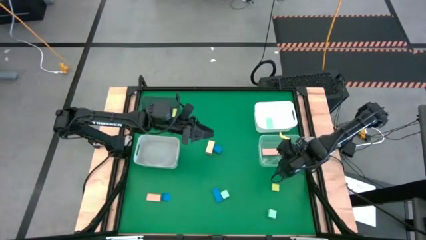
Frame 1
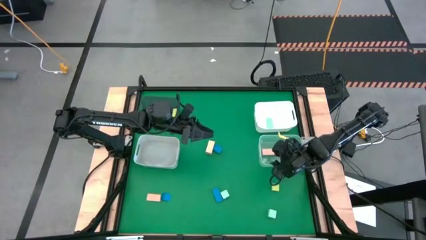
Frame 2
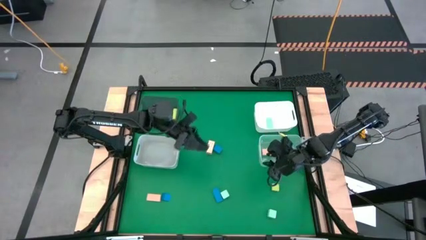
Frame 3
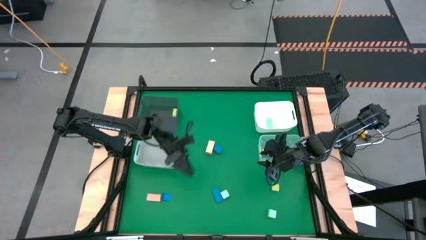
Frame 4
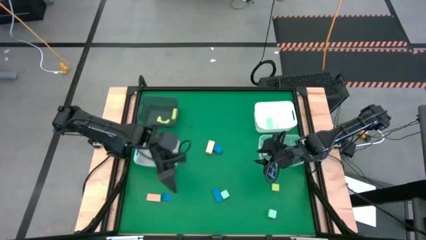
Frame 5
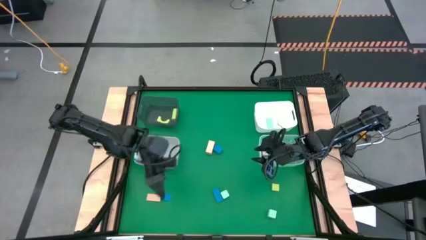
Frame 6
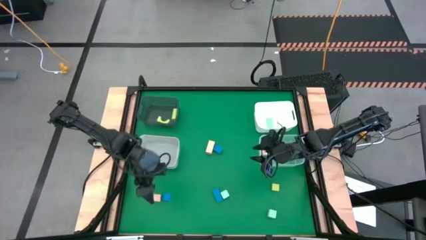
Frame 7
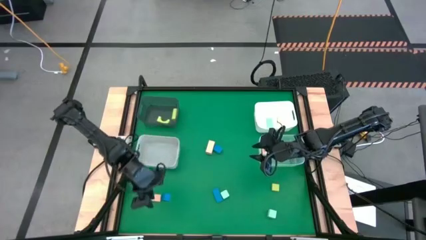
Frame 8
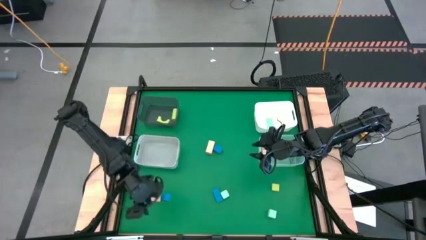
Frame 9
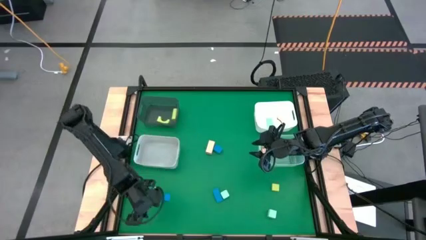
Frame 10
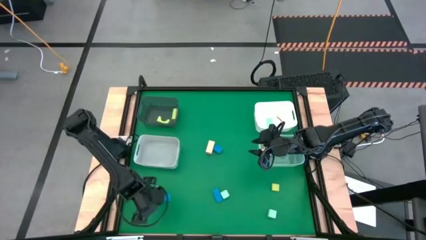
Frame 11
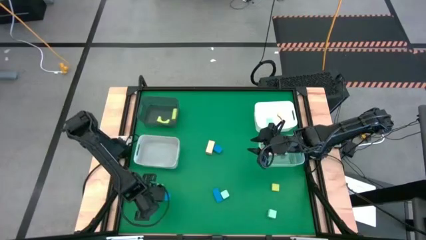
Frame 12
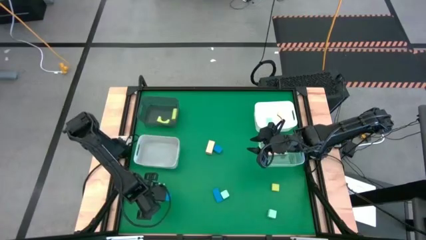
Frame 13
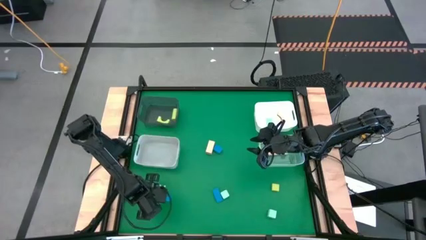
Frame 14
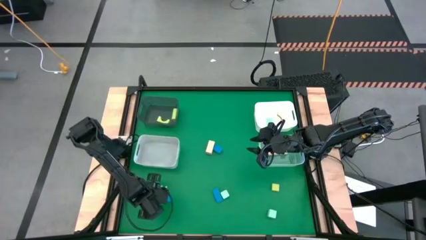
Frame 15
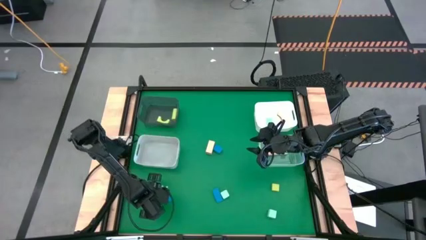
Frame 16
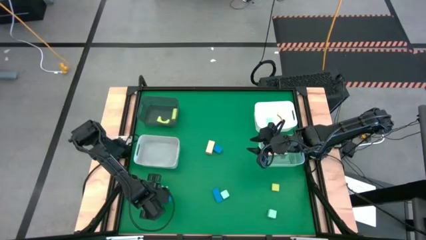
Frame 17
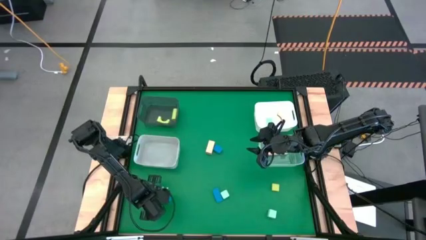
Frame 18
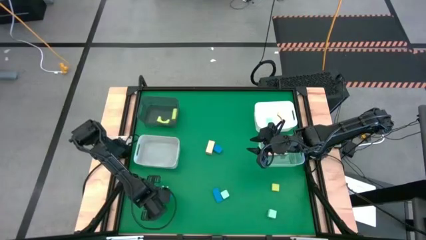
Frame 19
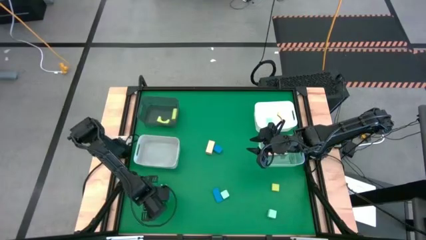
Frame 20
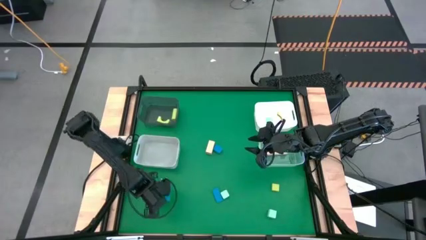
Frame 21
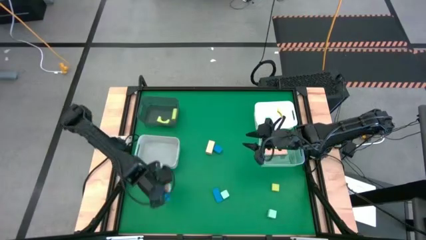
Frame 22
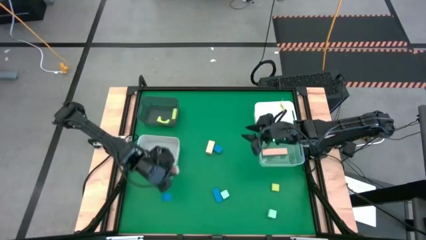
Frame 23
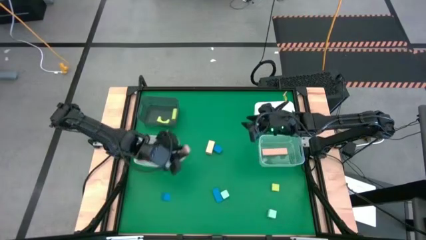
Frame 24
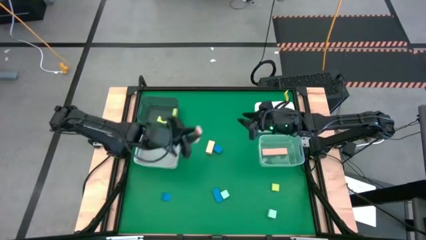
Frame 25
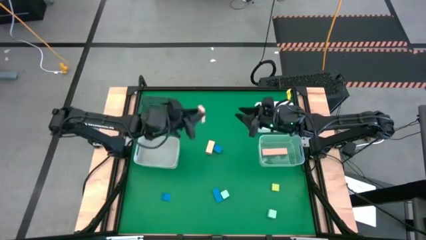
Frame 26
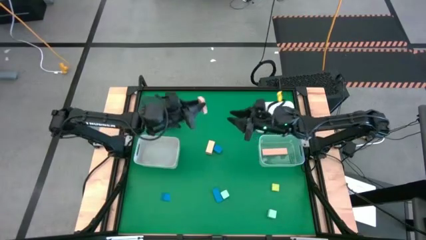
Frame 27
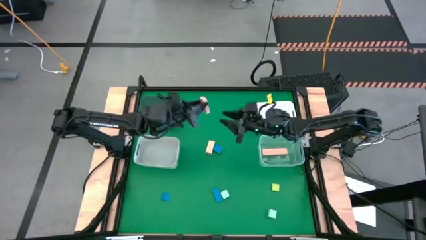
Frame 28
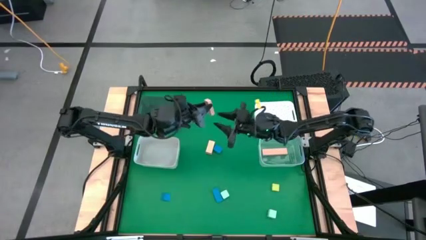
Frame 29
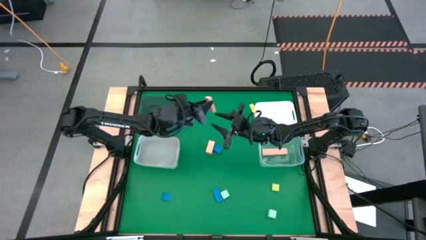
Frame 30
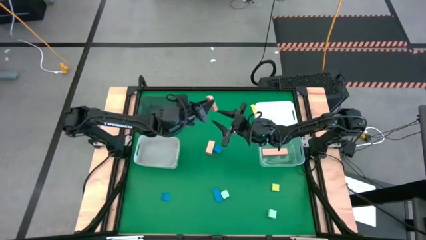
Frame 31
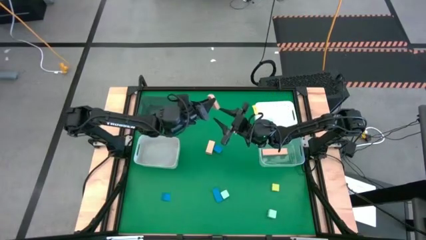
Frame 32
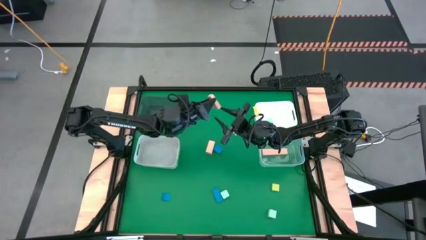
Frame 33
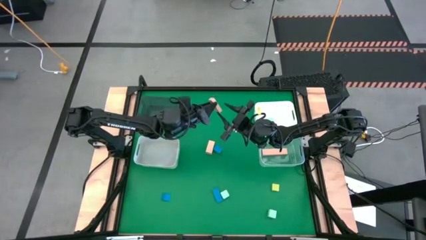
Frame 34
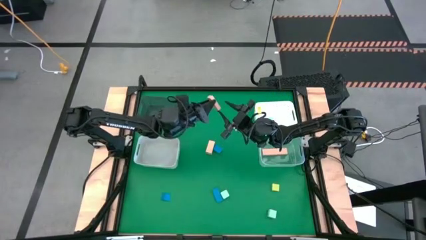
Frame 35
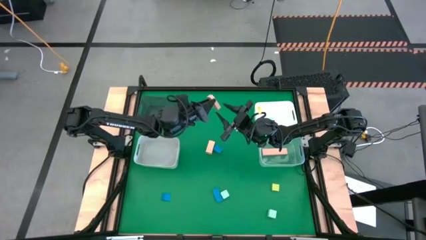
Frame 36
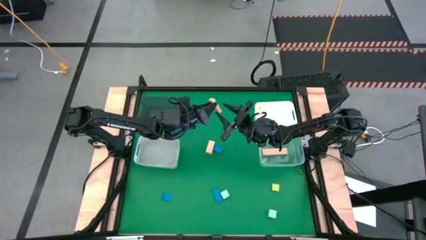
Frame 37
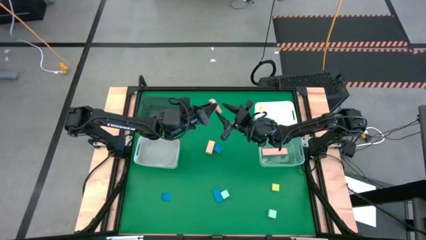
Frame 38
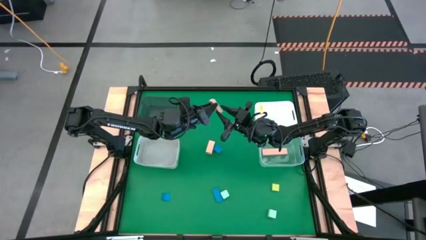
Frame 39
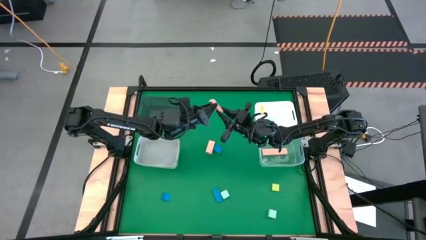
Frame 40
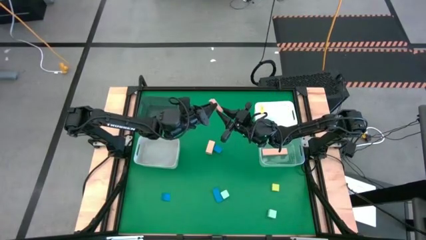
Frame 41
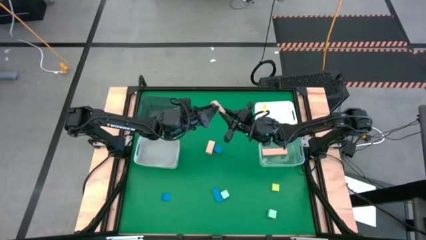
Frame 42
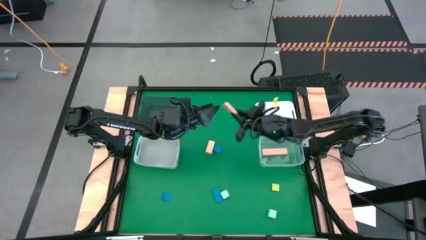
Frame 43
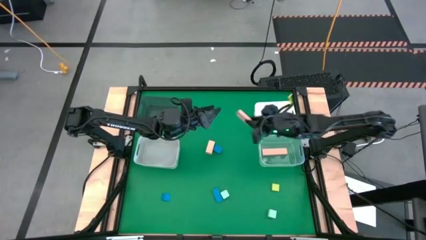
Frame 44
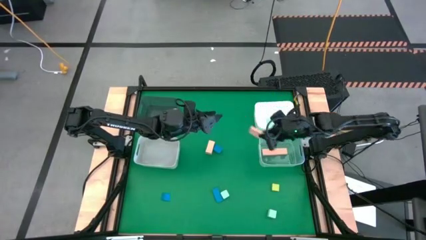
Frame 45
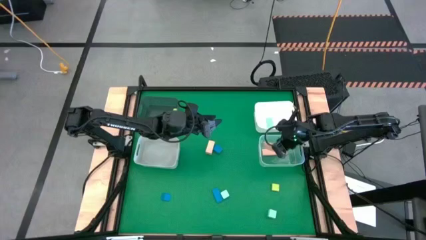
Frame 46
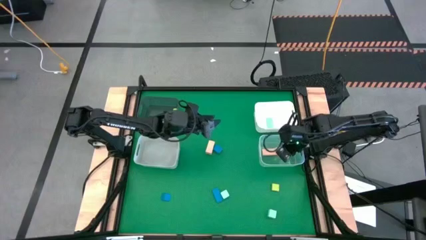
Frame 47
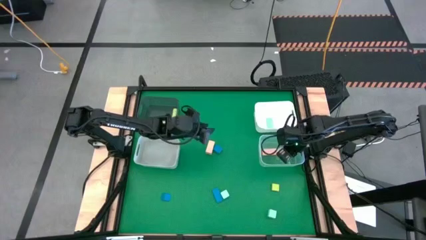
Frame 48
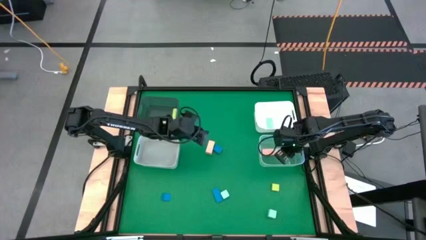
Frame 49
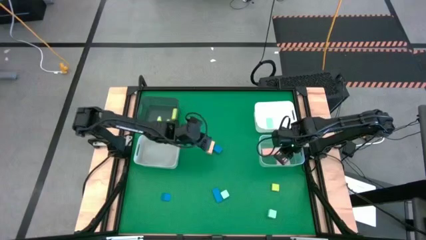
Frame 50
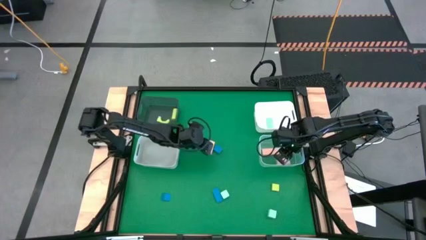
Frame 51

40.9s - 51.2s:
Task: Sort & place blocks by color
Put the small pink rectangular block into the transparent bin

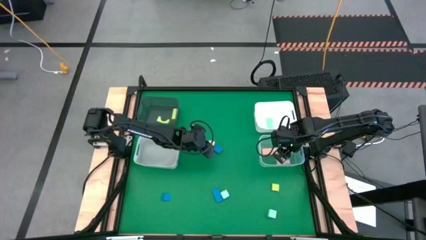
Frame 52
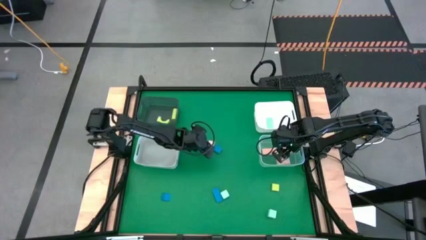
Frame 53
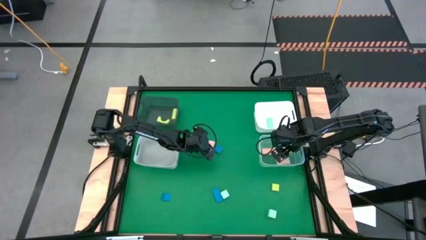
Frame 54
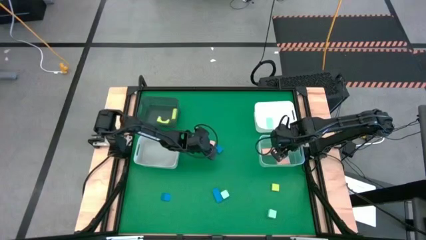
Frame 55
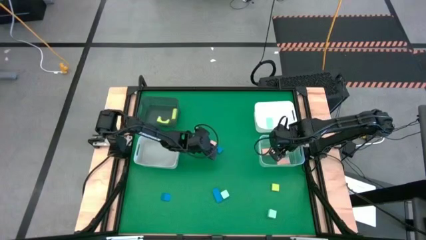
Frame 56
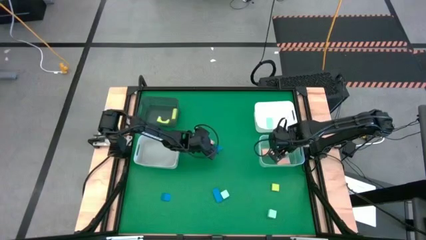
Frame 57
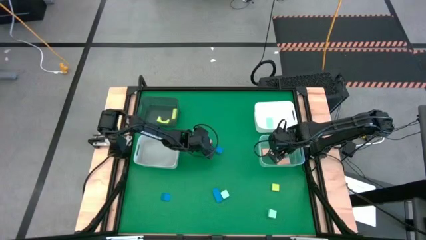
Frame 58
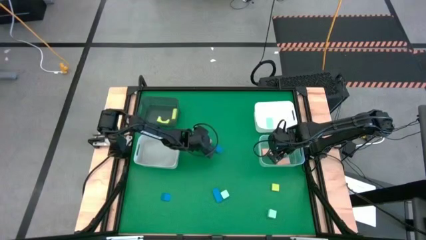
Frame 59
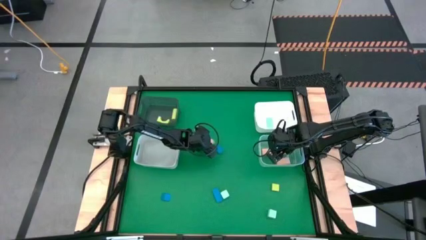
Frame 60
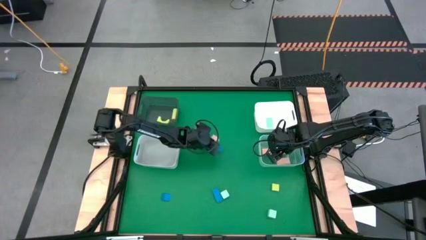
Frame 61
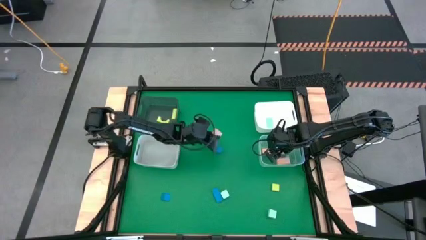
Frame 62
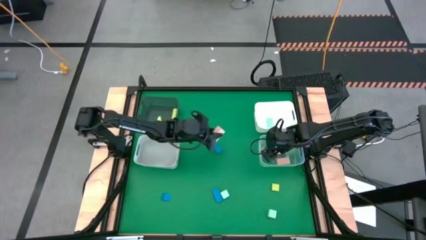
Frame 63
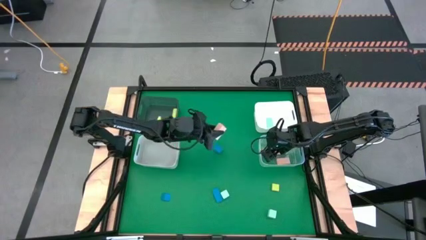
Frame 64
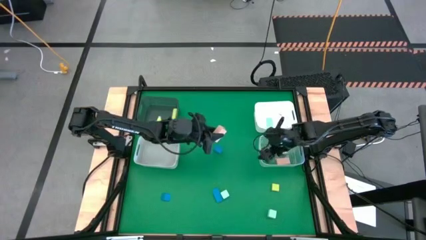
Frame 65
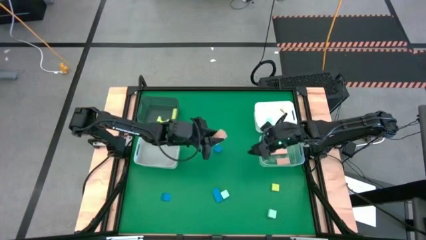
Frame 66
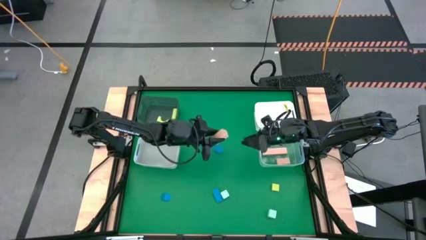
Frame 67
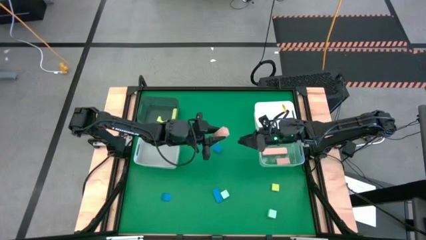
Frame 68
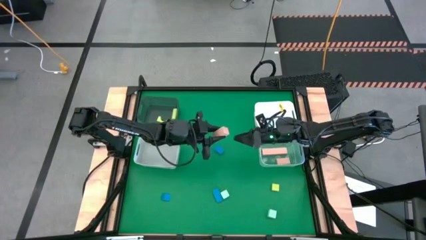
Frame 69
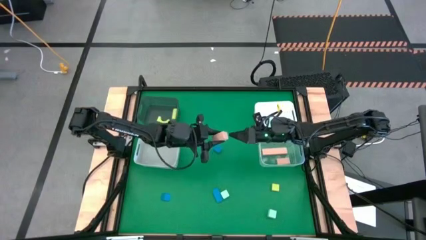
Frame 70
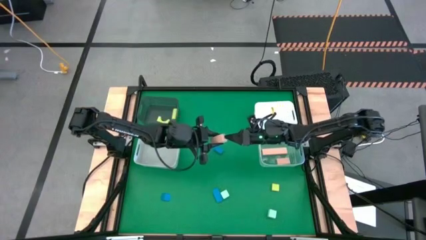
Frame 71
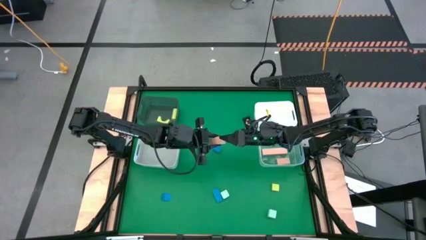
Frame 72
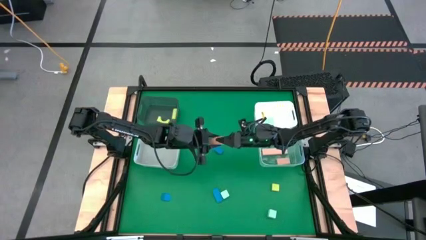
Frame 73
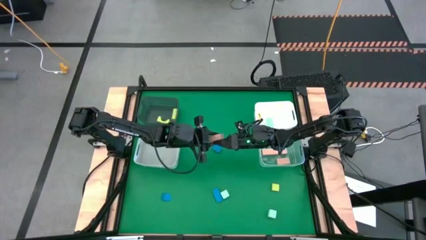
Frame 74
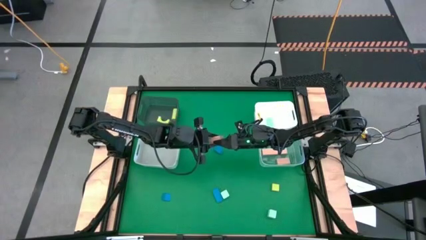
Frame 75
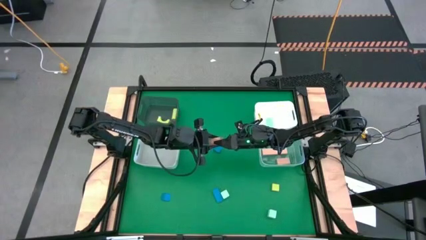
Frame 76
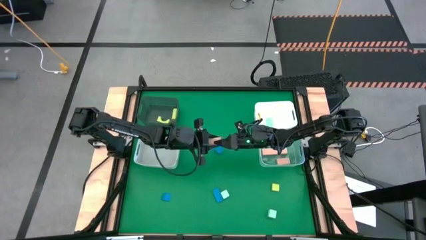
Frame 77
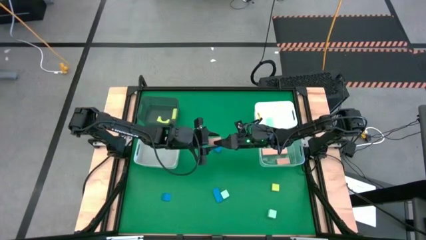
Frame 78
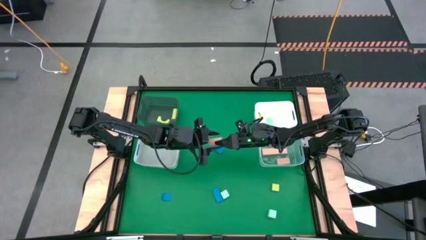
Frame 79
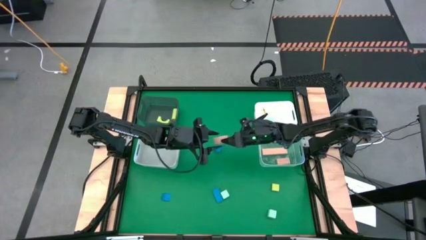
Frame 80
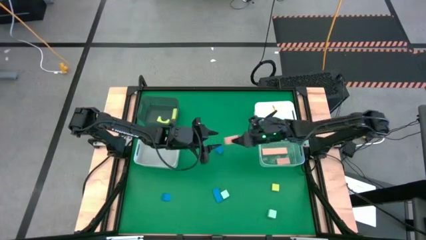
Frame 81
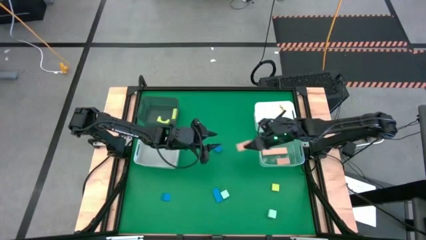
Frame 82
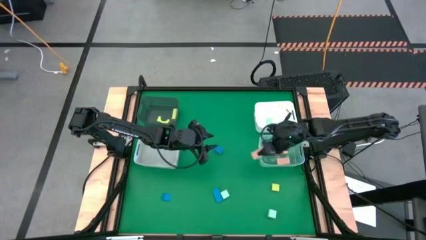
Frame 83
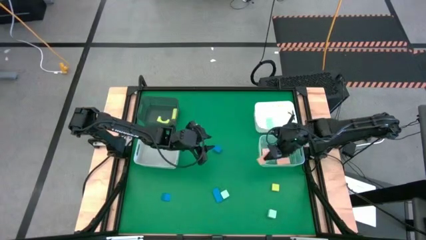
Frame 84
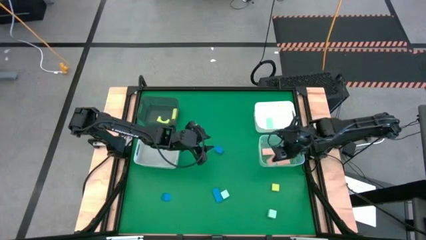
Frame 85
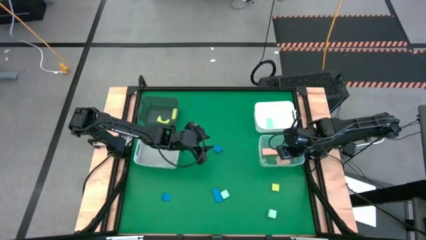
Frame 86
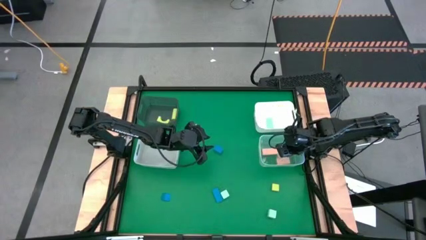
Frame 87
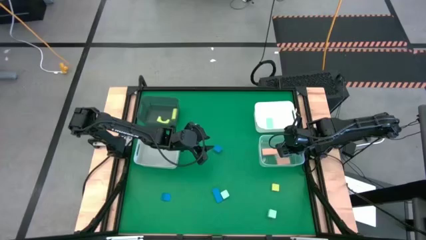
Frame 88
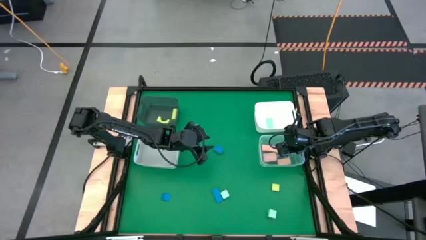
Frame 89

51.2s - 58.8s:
Put the pink cube block into the transparent bin
